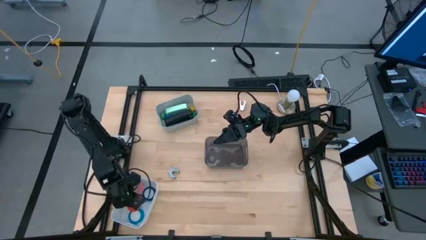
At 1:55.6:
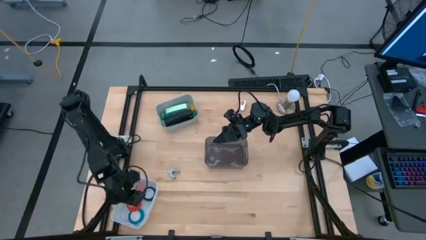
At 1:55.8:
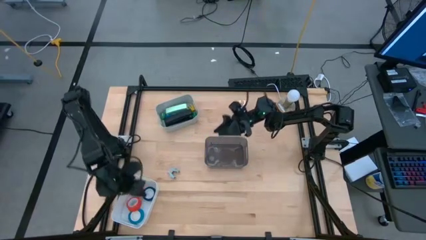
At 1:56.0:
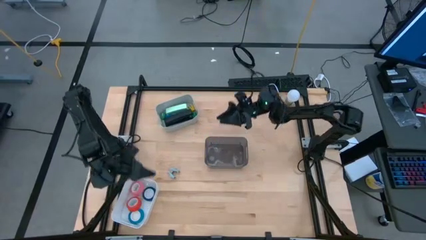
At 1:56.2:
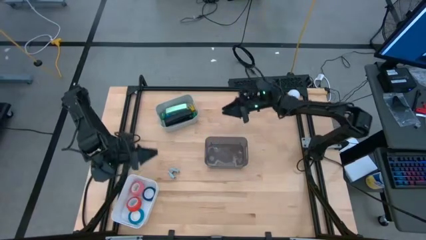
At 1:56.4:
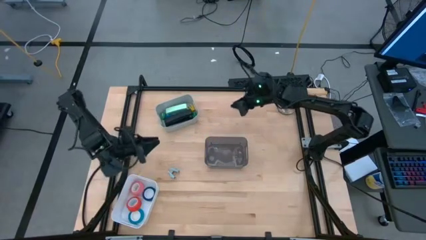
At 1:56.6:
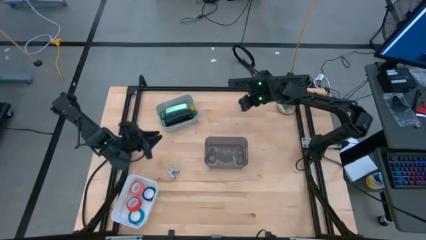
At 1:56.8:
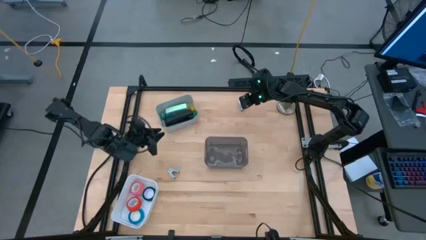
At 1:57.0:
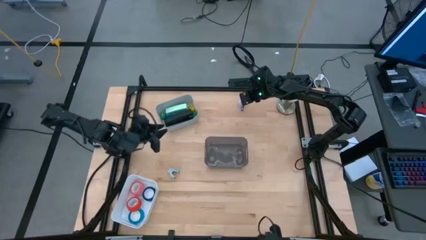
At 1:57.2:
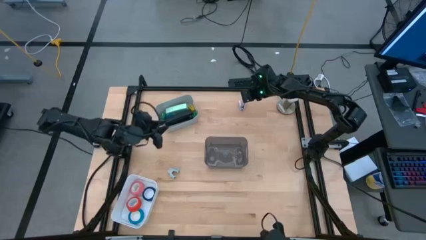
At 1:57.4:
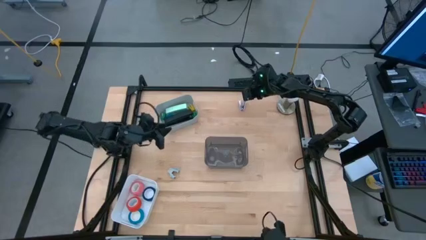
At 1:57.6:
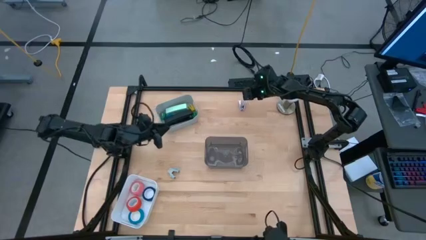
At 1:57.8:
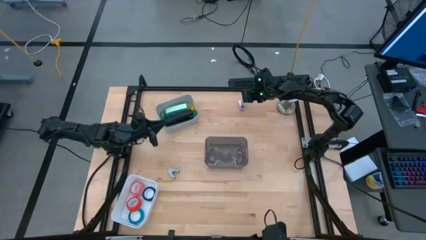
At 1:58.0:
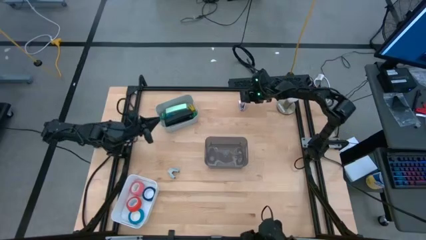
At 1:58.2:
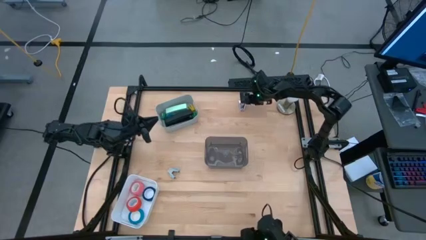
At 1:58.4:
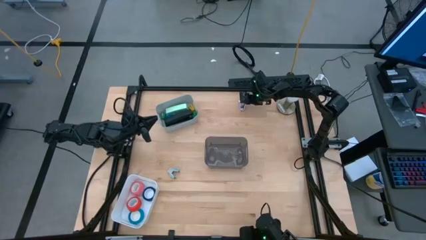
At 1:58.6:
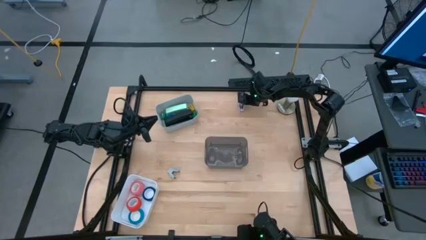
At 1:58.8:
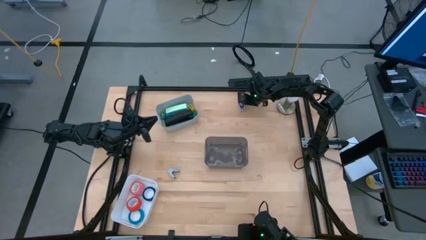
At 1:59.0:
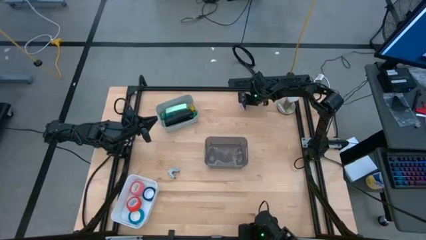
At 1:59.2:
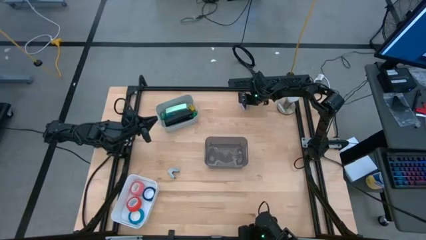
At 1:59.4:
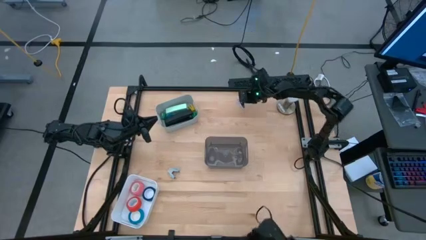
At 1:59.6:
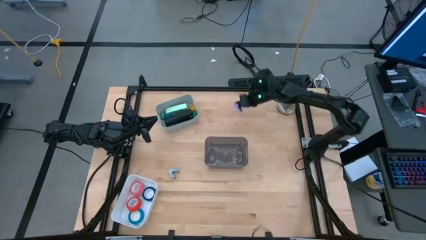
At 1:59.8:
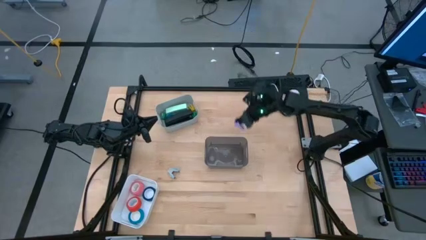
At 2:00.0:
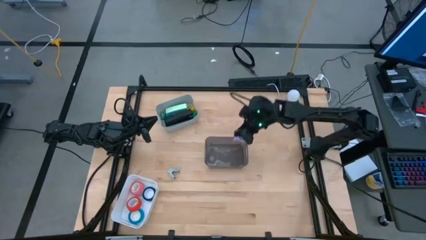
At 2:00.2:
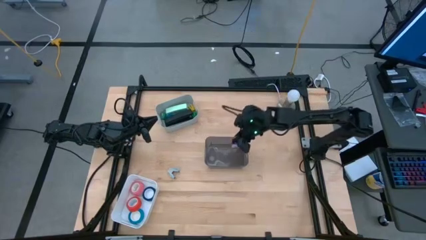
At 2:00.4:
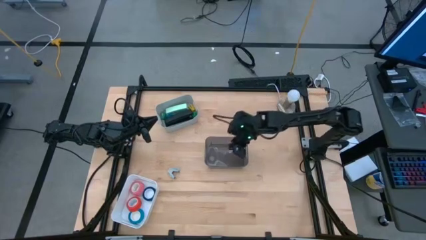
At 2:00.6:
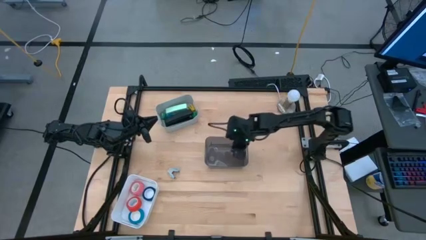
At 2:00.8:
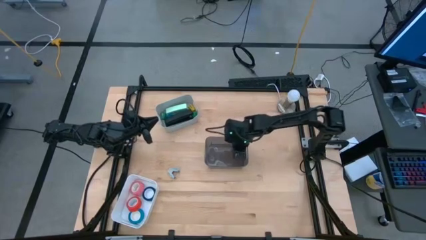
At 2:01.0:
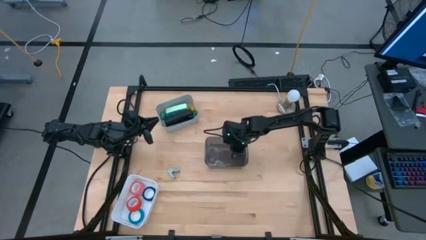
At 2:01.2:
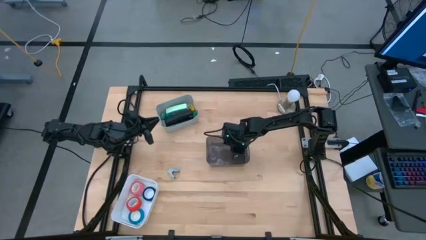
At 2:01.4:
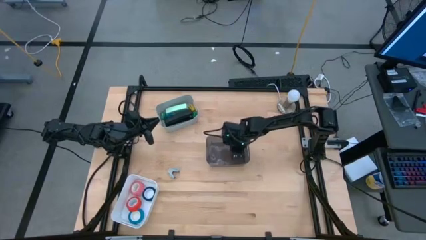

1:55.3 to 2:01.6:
Task: Pick and place Stapler, Stapler remover, tape
Put the purple stapler remover into the black bin

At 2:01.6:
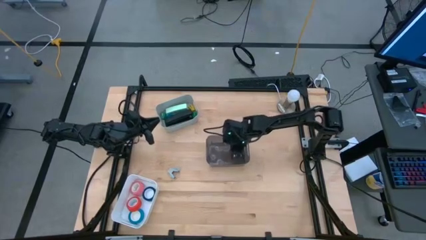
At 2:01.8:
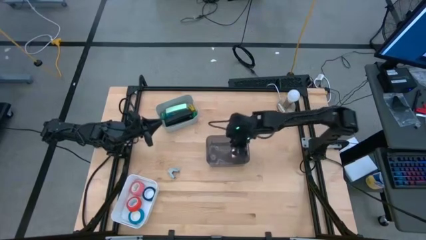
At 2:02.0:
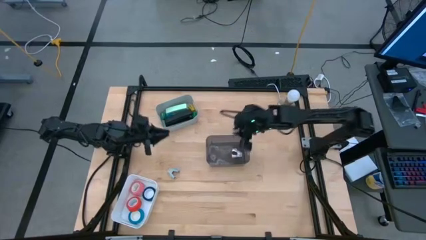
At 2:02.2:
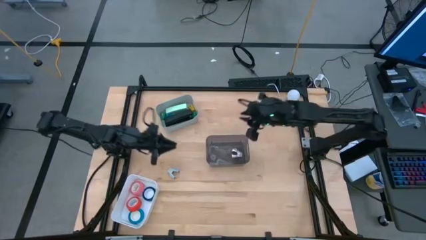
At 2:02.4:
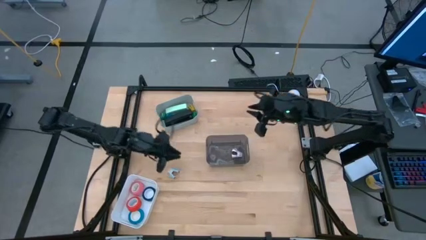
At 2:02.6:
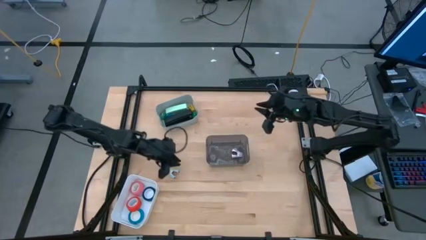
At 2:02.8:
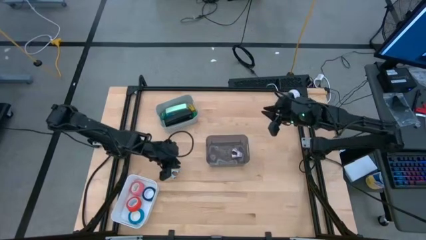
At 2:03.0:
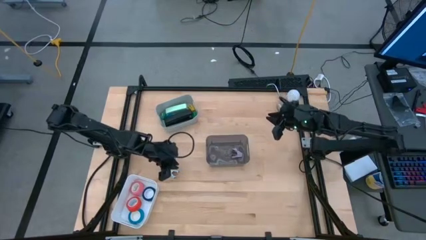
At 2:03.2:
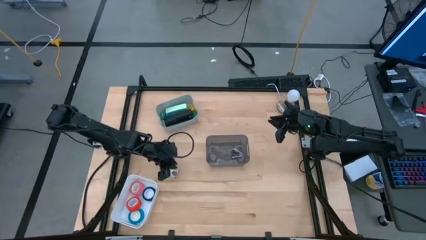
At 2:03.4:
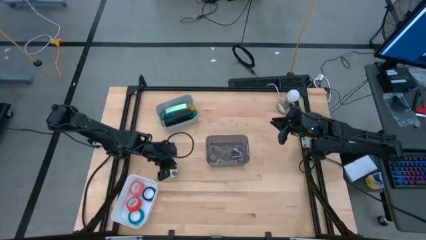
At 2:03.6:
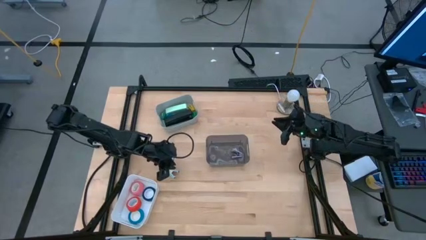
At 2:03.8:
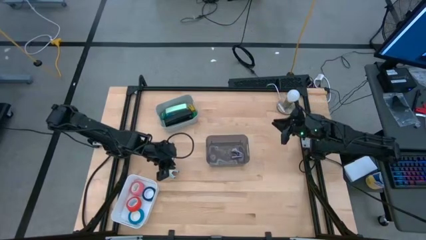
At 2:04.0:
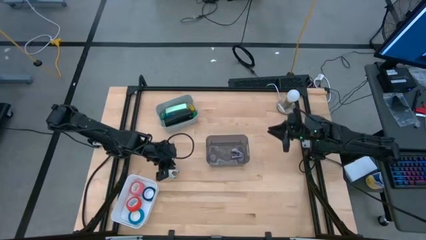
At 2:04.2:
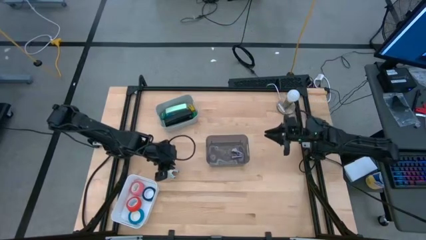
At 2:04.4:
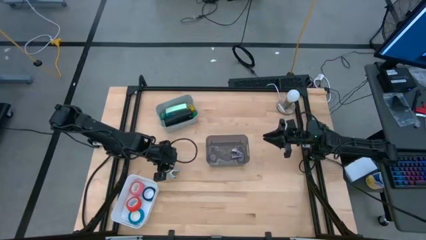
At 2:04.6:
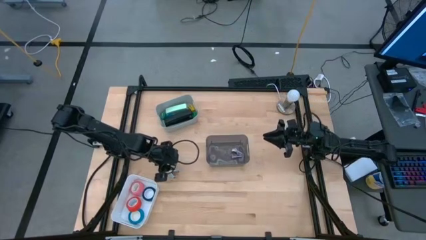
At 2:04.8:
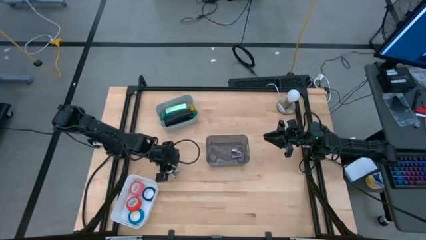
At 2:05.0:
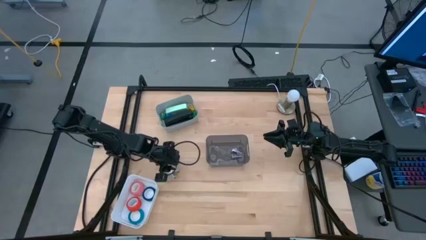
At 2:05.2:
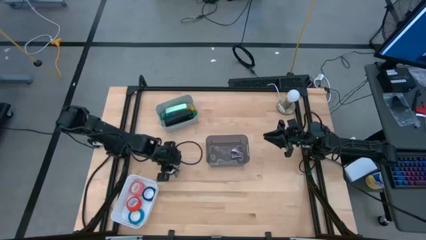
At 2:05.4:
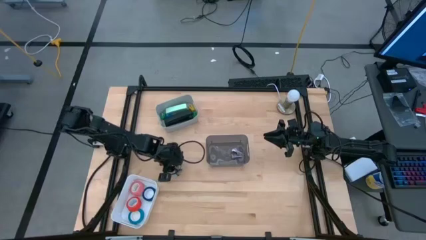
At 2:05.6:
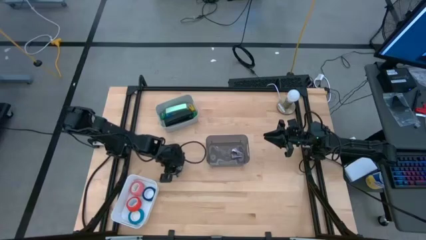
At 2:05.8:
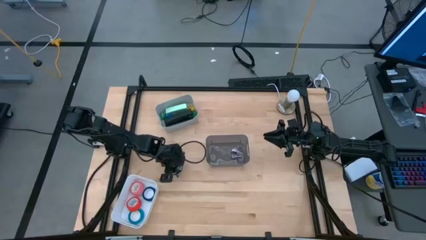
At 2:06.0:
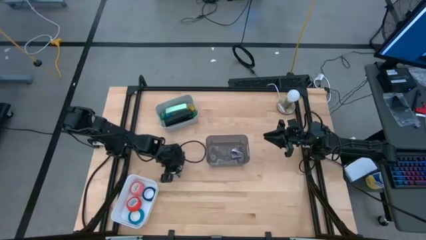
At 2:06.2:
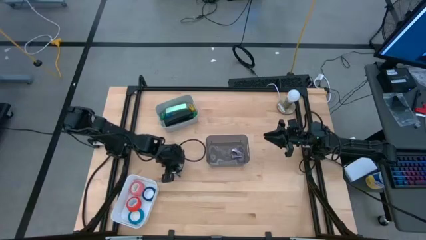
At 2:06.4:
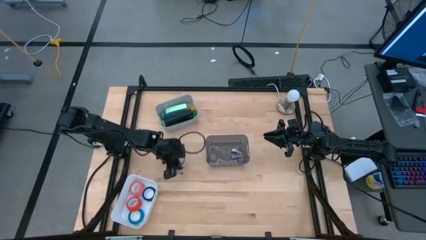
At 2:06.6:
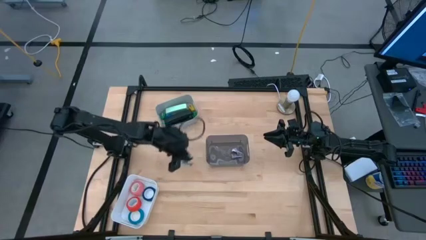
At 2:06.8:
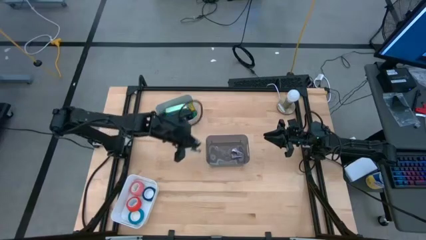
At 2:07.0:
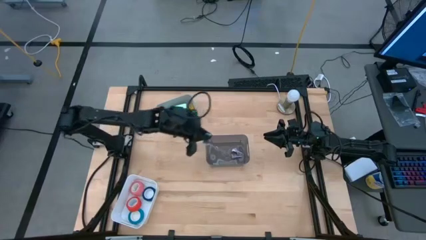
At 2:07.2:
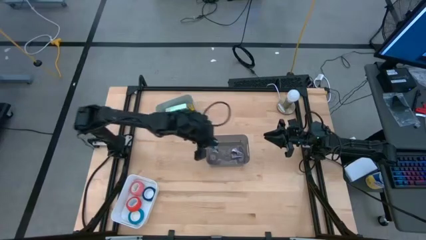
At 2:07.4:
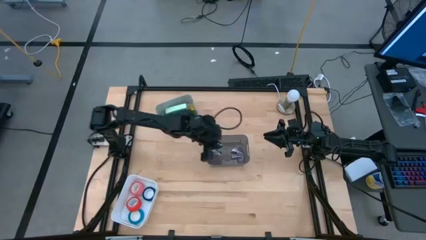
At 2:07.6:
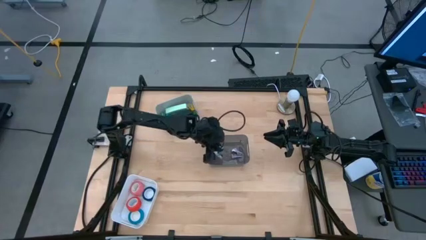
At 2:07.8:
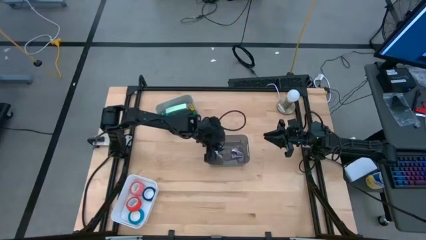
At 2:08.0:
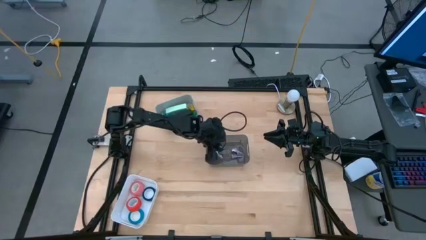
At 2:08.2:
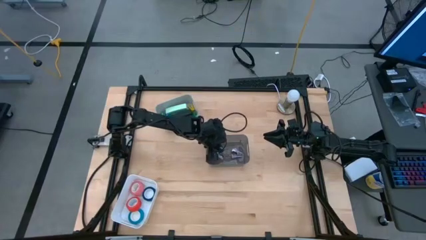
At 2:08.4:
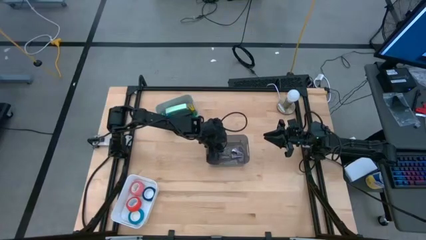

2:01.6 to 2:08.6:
Put the gray stapler remover into the black bin
